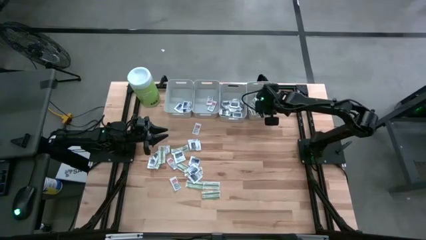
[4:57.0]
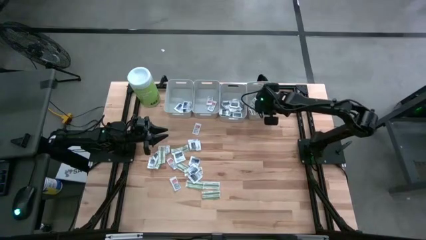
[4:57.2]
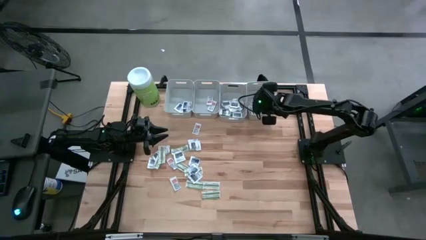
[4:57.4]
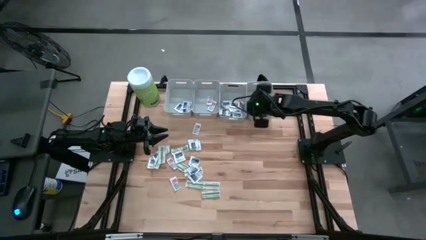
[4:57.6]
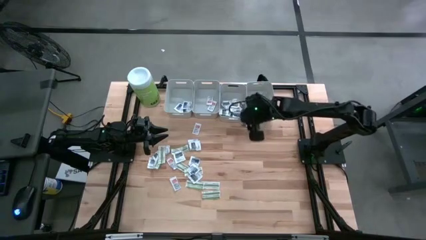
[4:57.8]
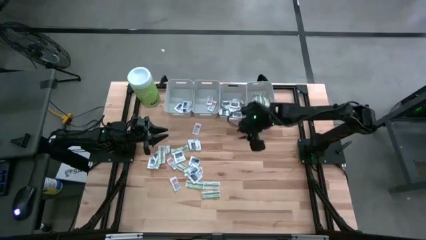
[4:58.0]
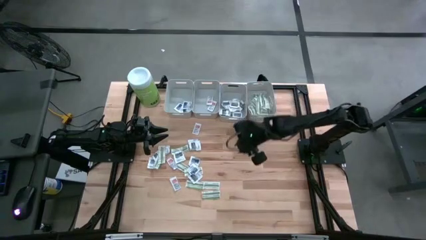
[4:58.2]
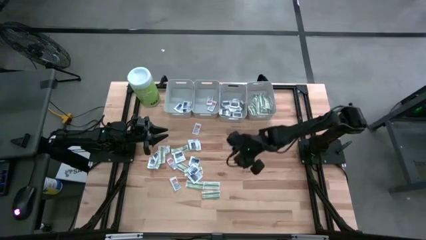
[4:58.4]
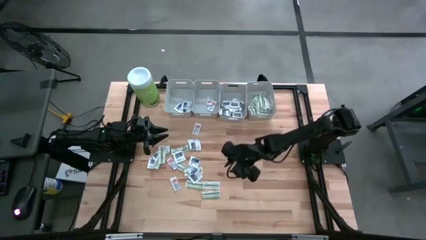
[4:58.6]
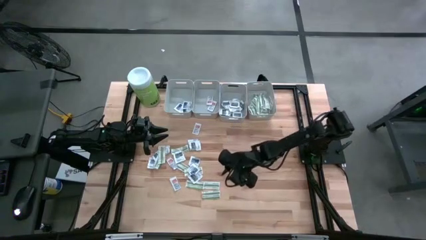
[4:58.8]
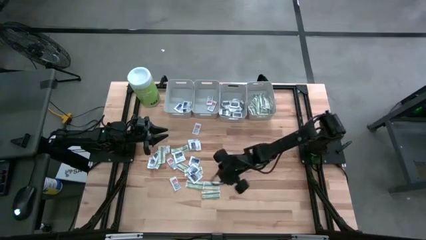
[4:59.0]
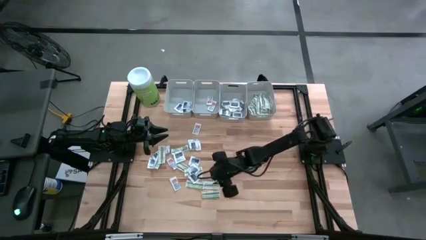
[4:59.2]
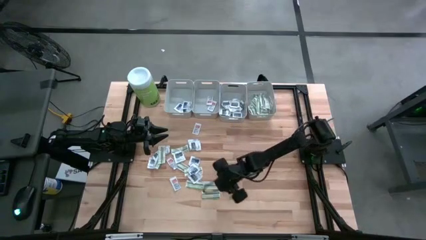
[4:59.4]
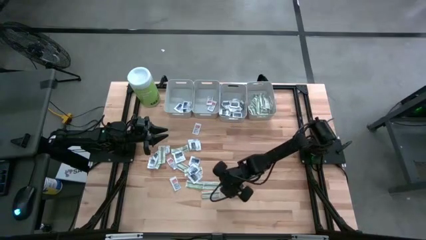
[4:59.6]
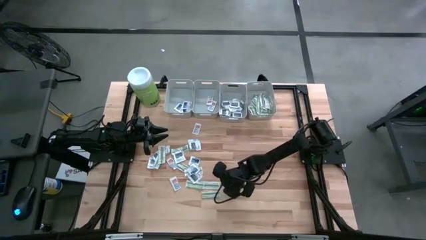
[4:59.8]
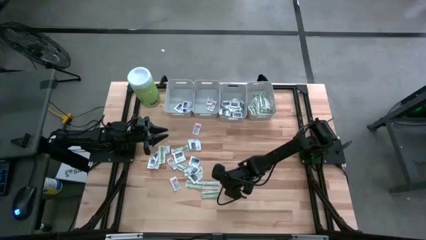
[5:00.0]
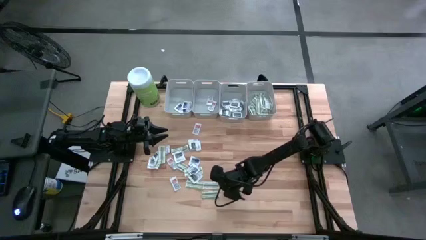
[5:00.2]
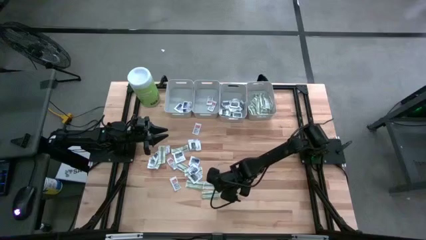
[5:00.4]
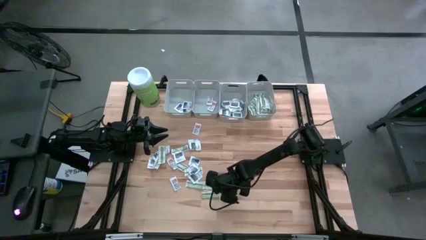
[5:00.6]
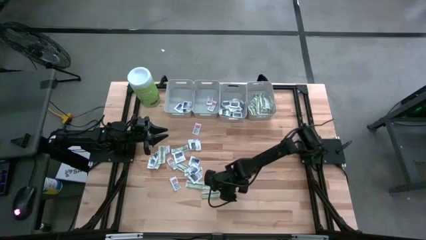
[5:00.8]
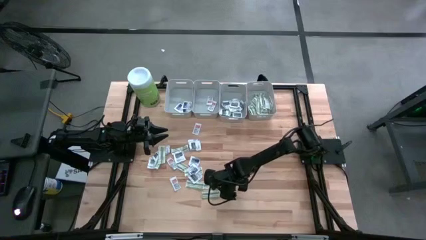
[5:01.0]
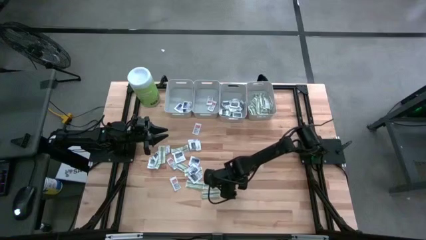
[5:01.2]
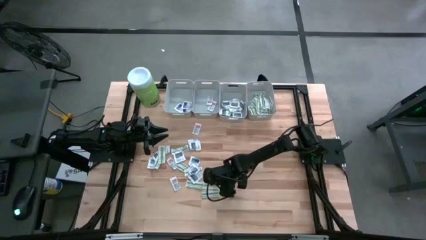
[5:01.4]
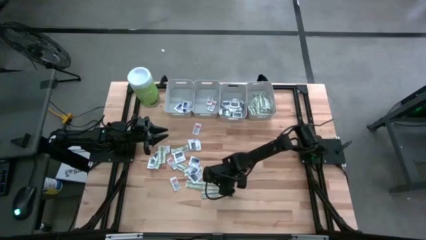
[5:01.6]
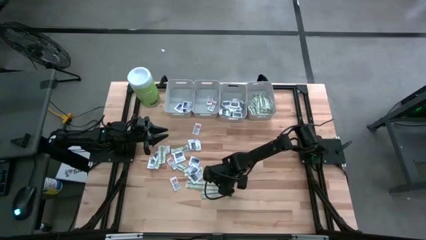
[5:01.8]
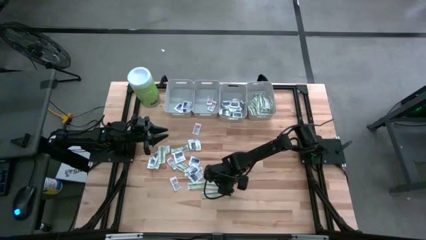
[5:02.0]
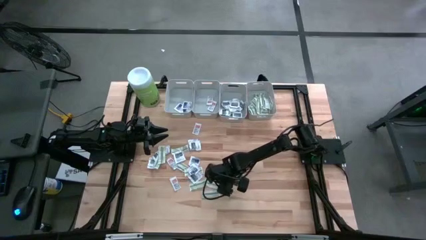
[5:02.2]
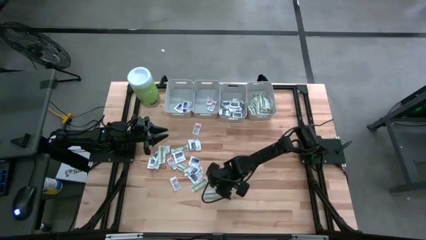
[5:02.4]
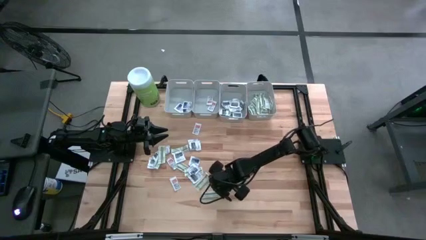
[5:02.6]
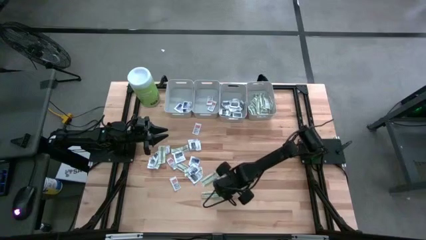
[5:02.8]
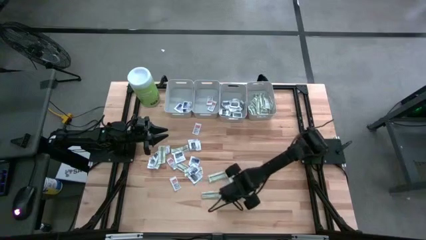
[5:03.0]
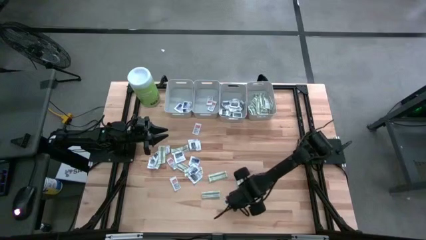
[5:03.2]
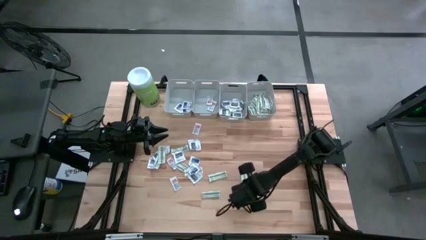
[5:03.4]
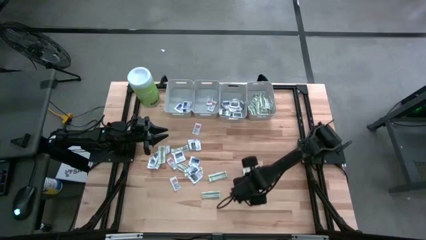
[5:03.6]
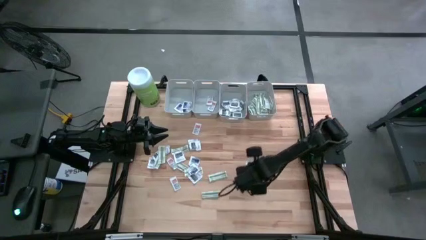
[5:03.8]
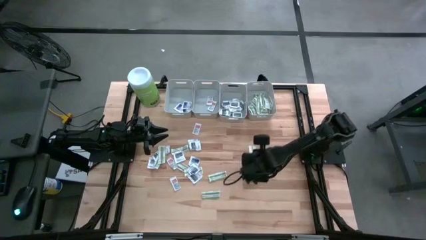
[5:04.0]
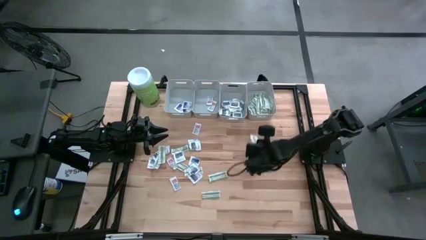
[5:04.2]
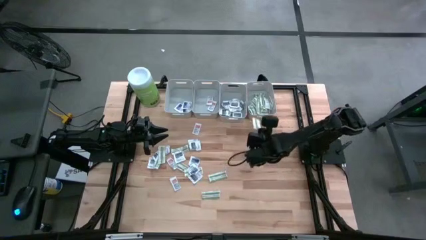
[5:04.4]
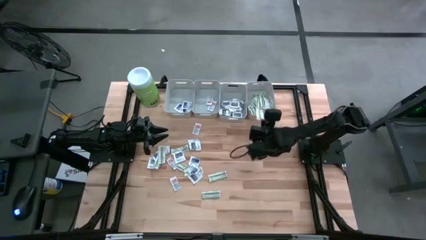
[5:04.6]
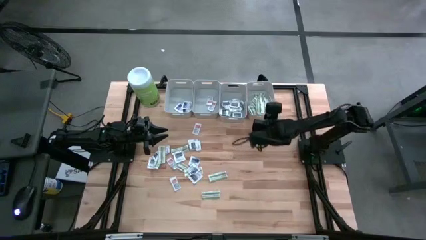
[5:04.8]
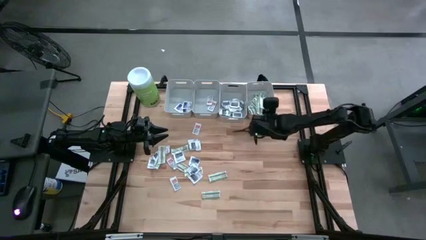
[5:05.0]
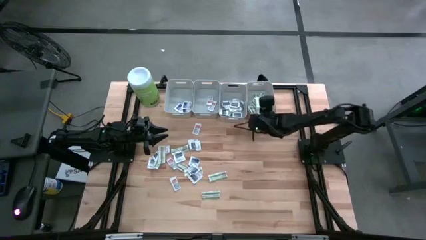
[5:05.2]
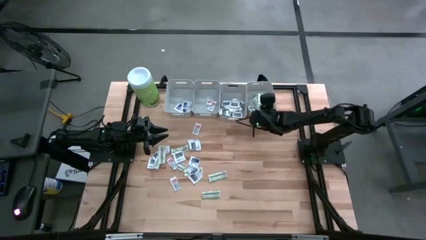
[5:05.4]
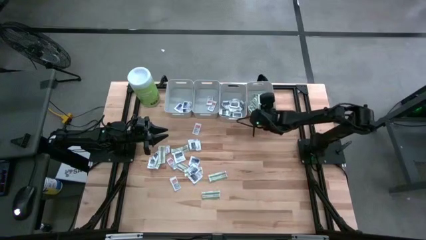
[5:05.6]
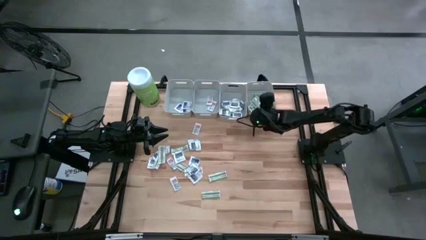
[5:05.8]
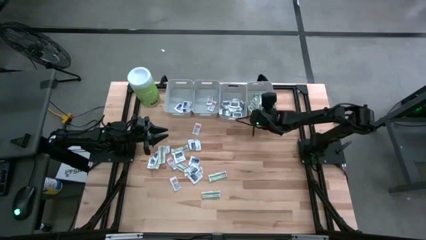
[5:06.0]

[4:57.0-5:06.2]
Task: Pick & Place First Aid Supplies
Put the bandage into the right gray bin

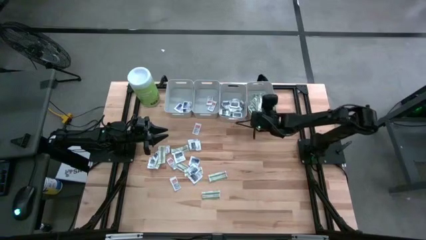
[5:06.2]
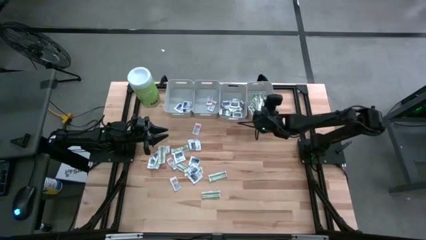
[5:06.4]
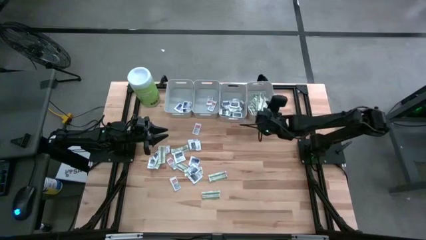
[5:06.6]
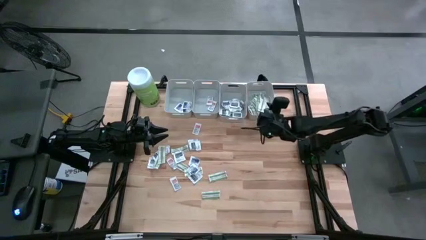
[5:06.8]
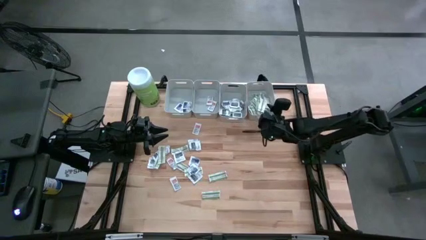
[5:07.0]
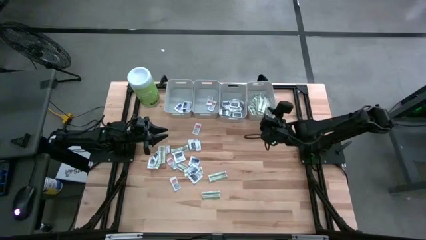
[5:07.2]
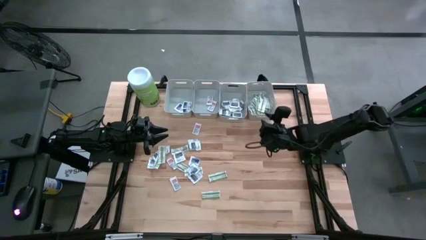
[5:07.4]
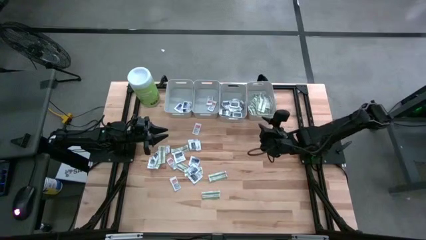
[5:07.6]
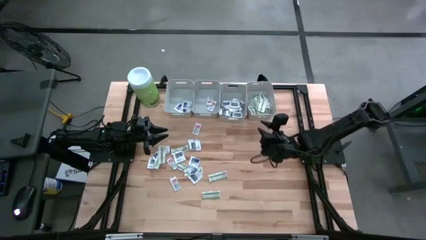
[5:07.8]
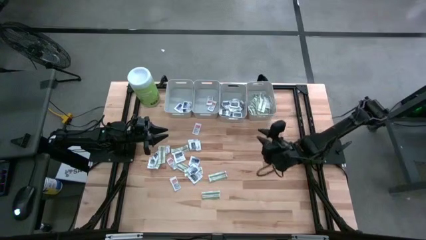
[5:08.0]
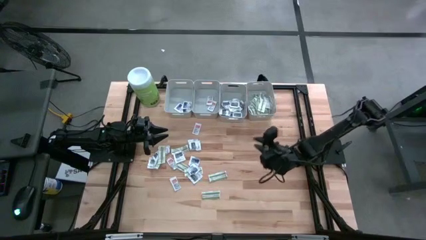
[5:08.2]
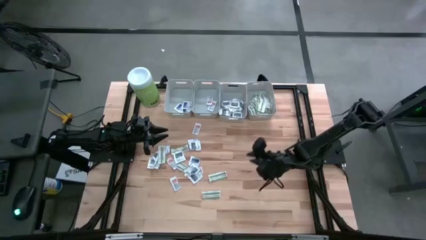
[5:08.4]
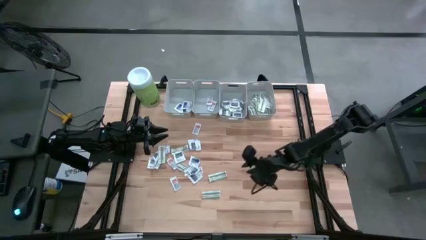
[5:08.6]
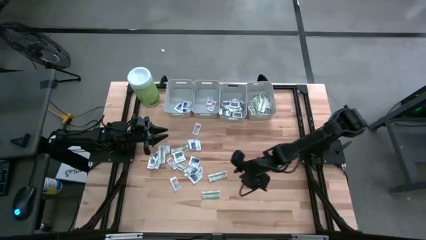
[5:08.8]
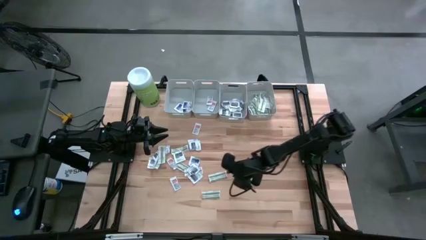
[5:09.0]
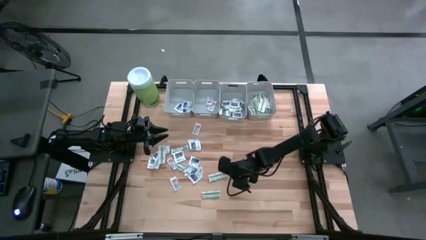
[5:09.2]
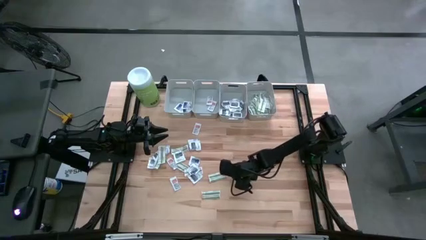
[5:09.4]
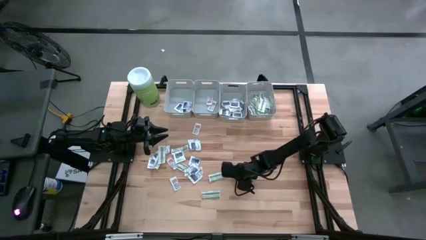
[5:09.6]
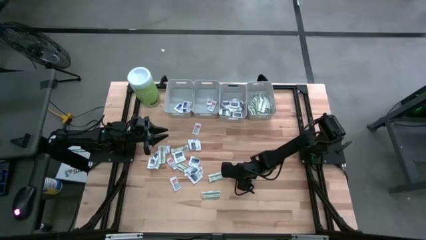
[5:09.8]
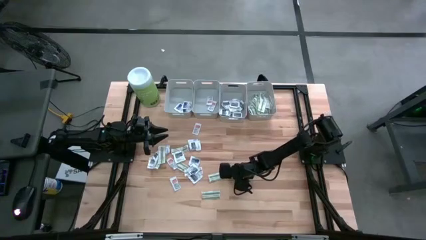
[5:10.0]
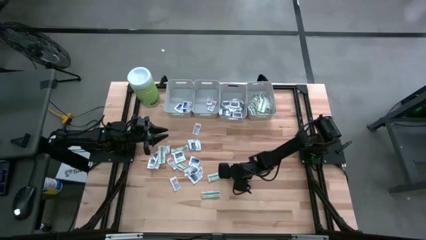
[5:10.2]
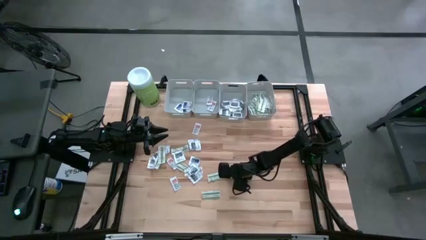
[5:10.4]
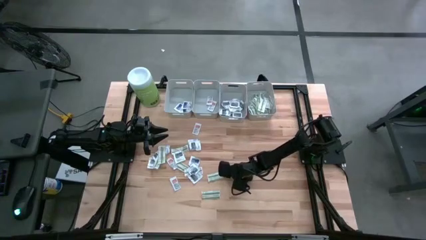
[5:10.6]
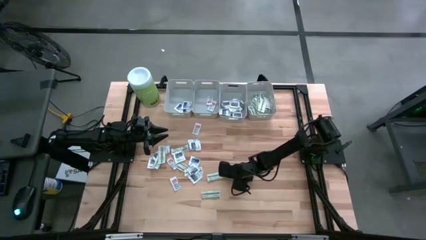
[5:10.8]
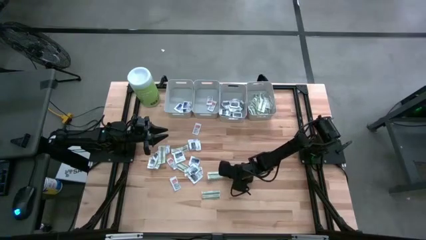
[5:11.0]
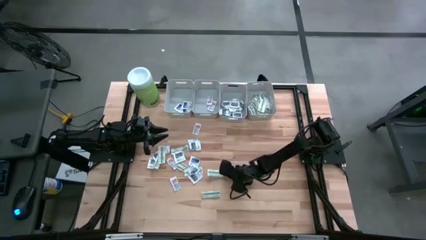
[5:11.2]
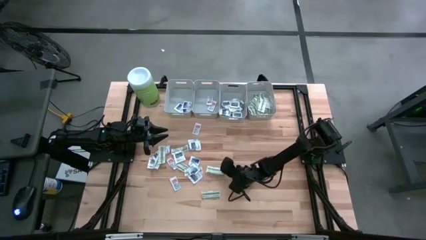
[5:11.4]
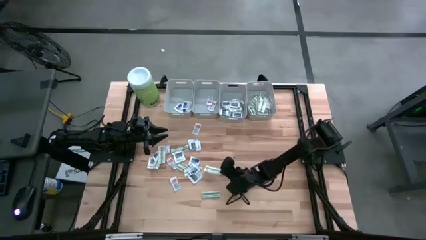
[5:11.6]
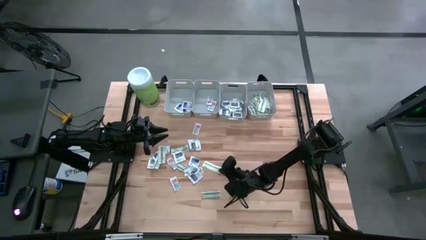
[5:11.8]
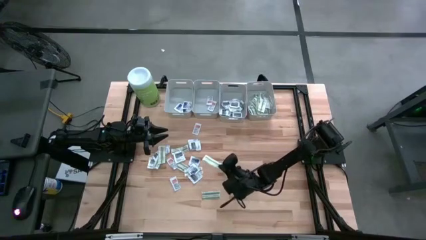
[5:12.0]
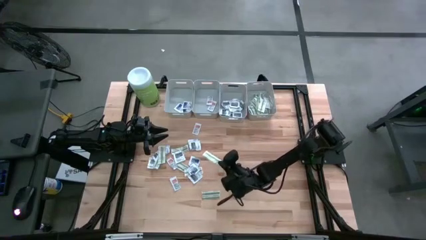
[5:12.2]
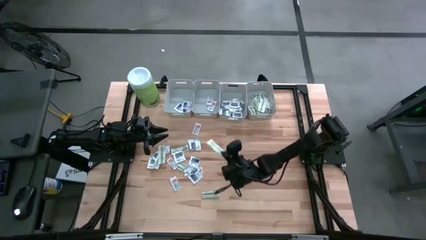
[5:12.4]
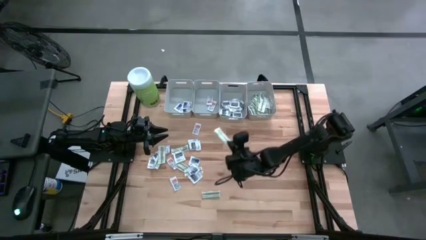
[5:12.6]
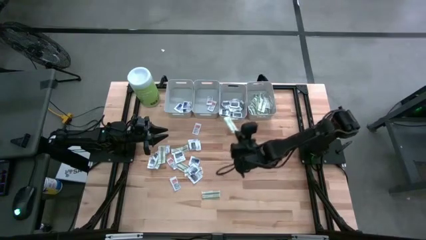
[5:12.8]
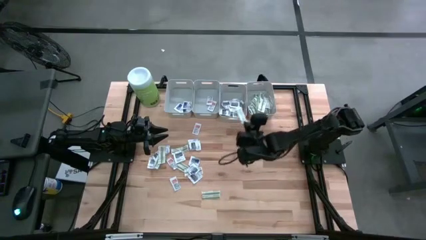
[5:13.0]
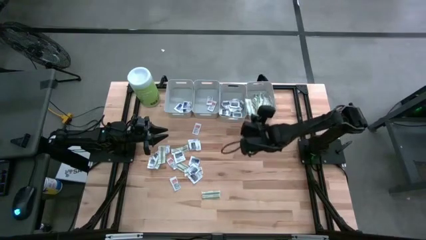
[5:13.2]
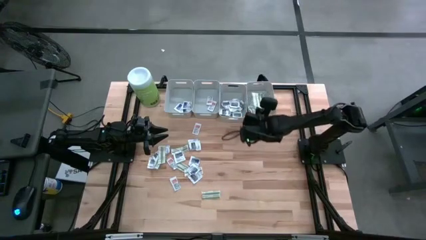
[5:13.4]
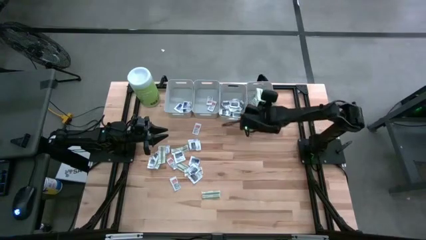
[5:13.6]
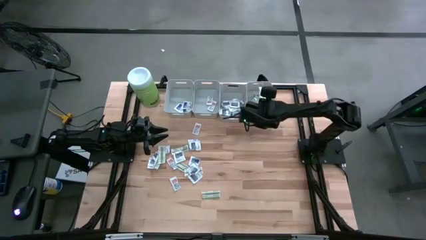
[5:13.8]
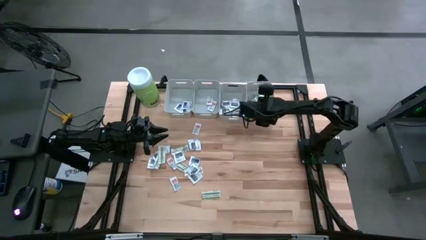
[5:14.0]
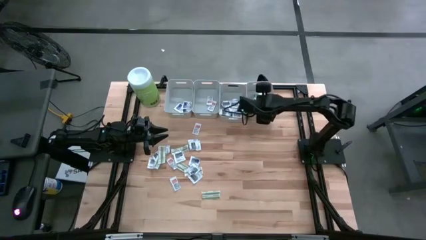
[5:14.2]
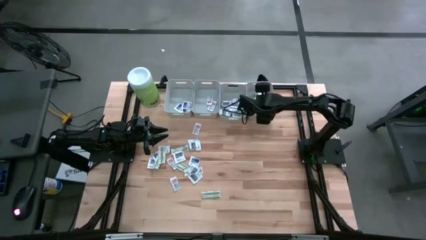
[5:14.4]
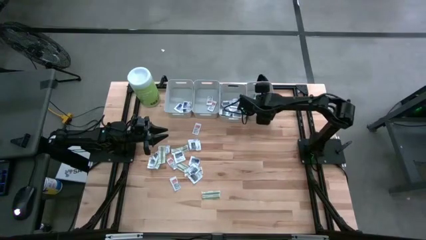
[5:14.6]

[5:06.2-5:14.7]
Put the bandage into the right gray bin
